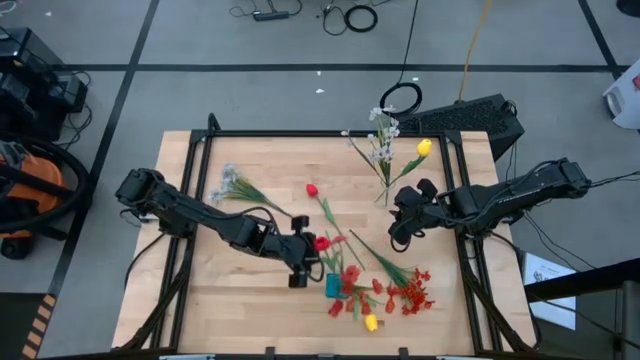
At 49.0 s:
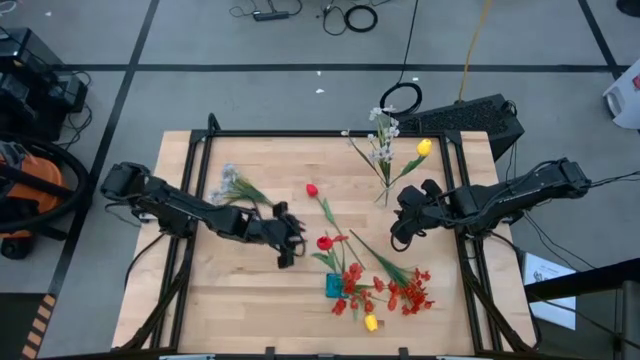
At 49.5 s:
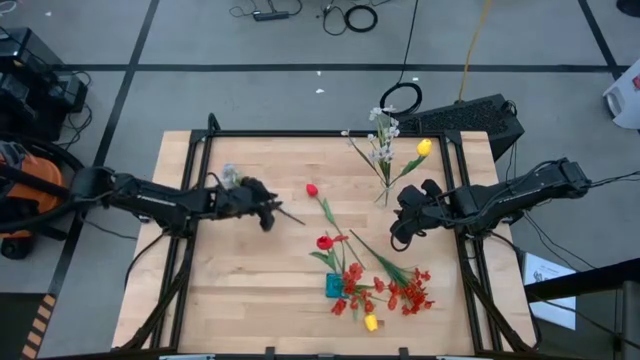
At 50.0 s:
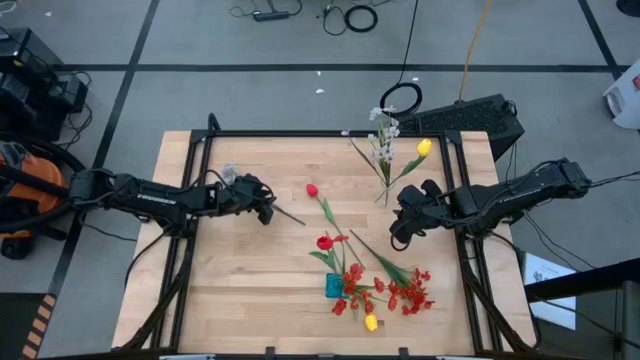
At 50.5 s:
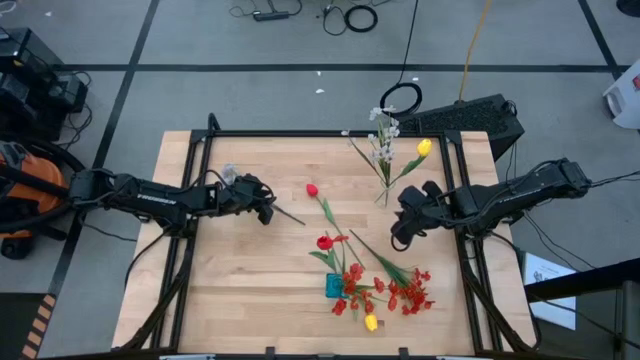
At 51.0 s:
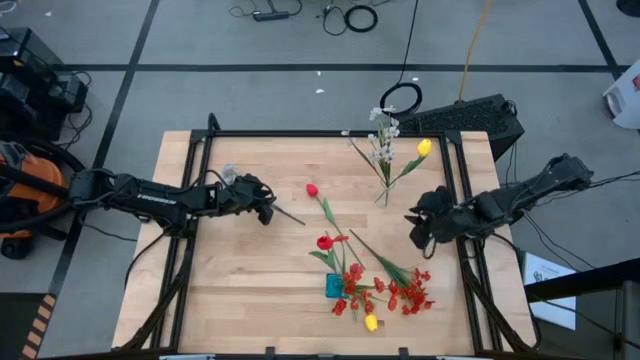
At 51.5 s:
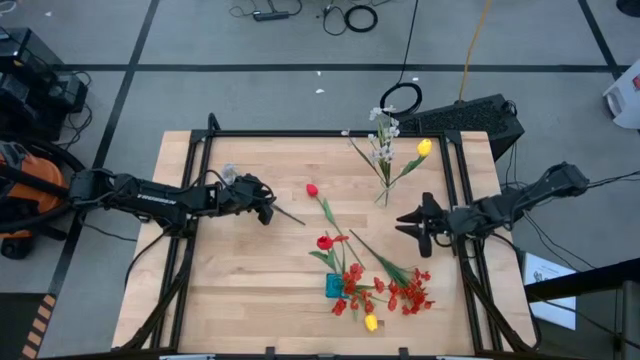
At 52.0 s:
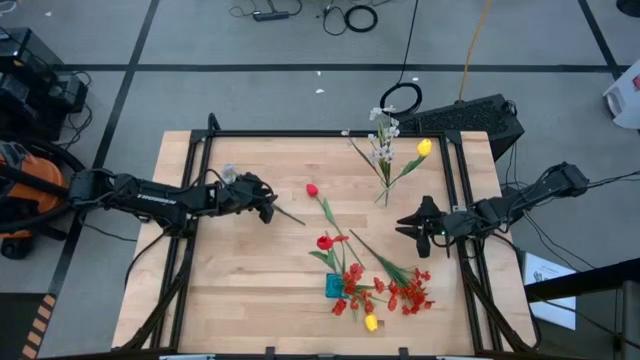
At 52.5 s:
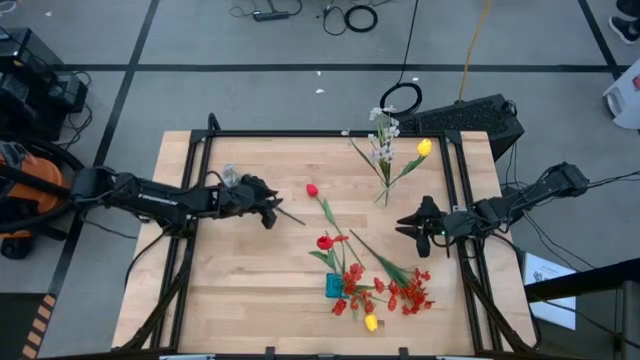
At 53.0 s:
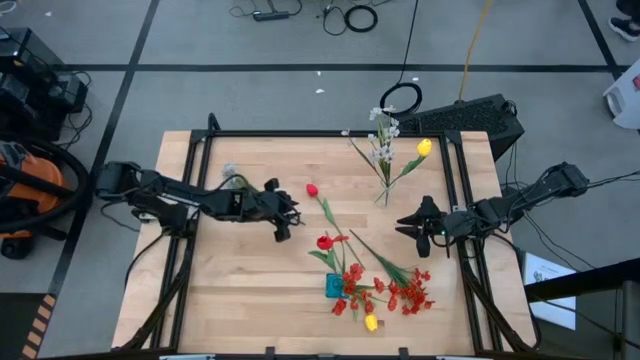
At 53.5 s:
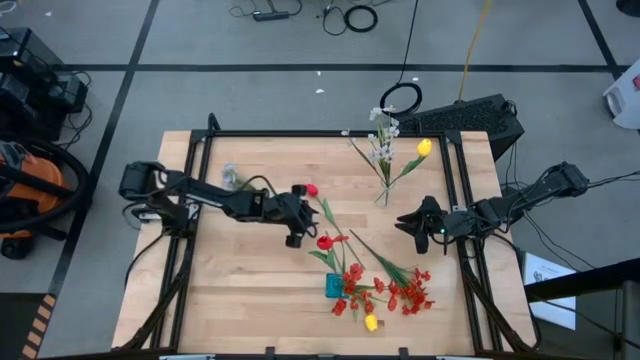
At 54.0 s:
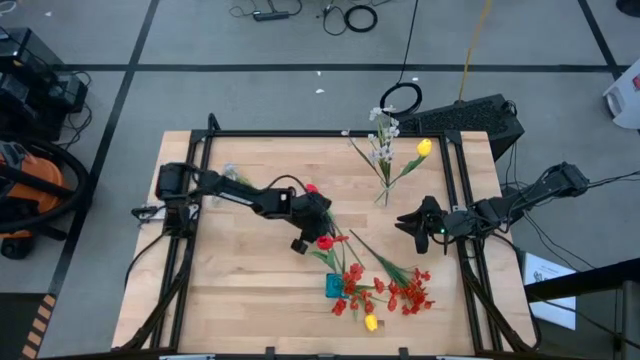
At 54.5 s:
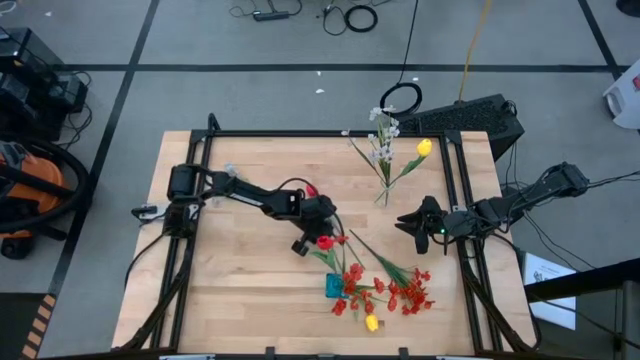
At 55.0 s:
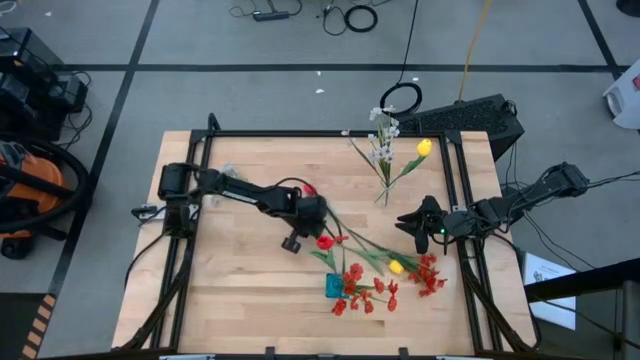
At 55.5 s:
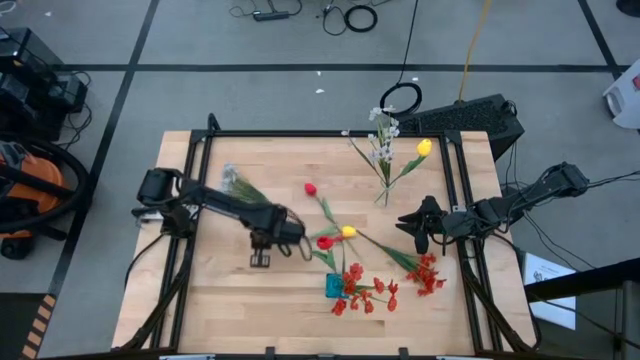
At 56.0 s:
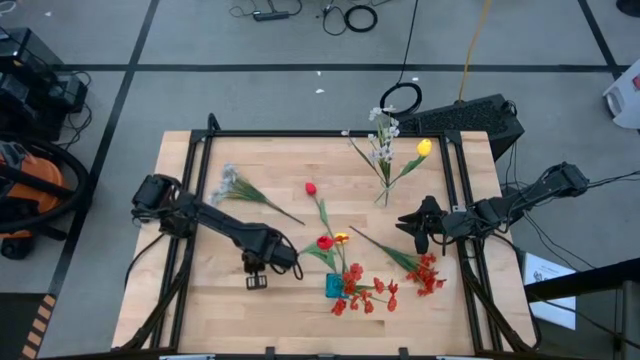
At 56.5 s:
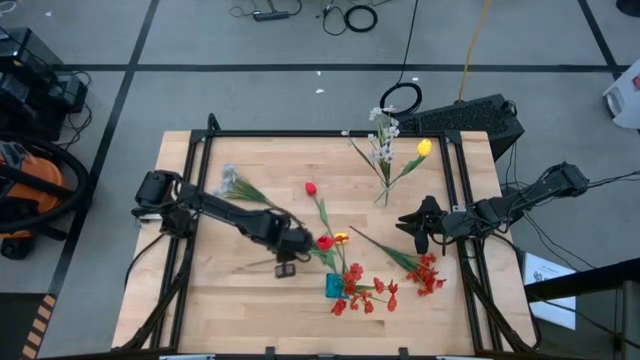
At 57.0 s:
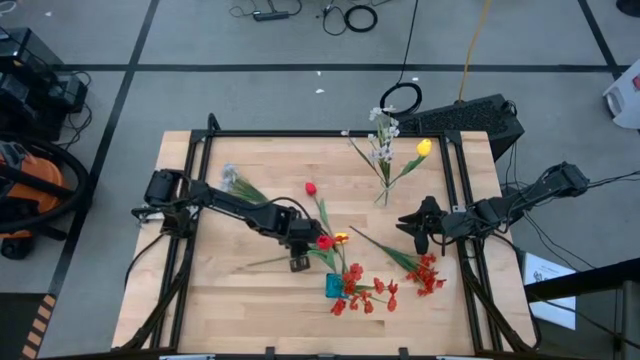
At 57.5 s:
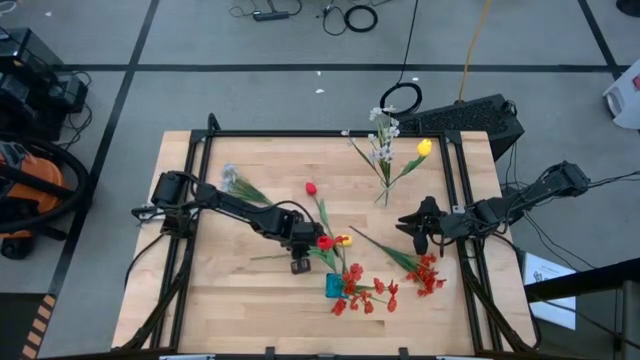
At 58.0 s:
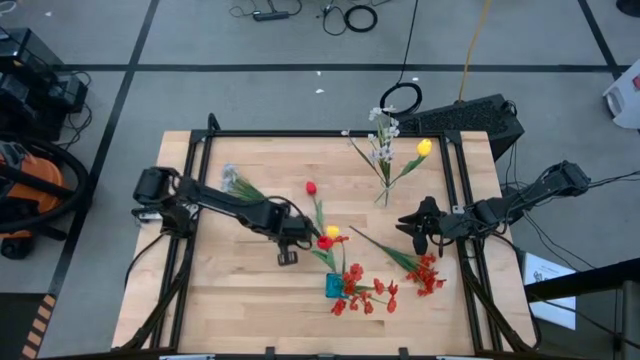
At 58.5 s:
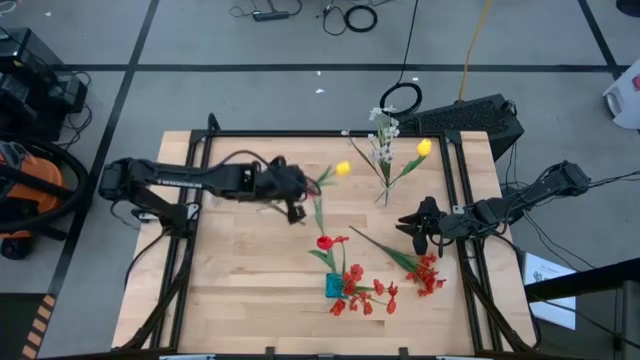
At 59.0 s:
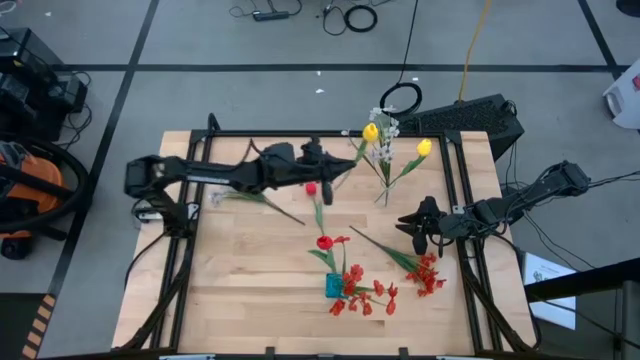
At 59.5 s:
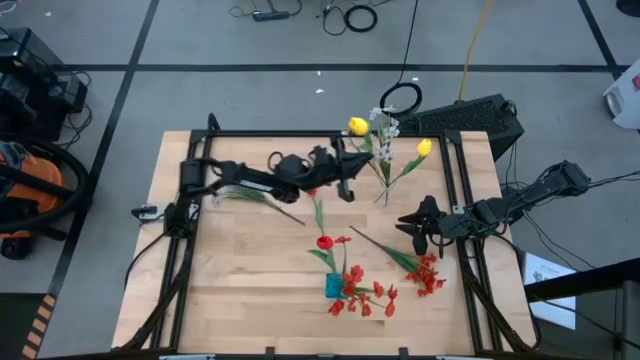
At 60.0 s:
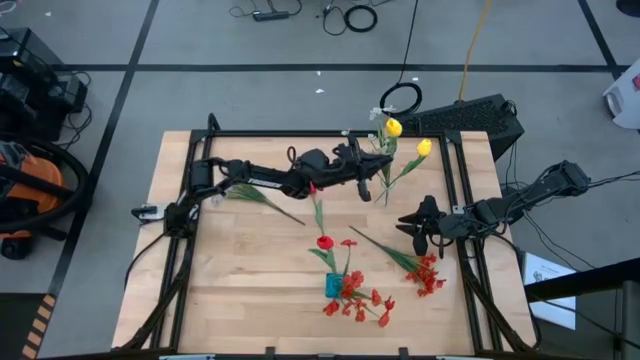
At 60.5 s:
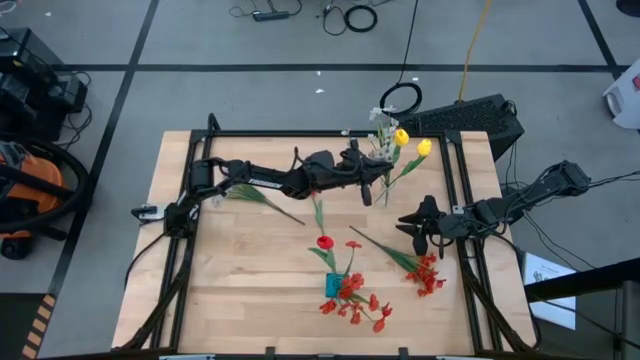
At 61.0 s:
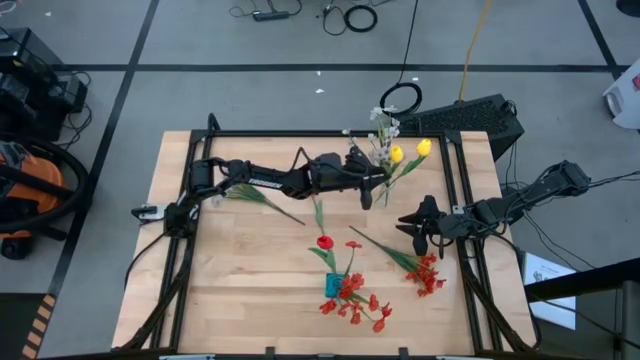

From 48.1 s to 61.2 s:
Task: Sort flowers into vase by color
Put the yellow flower into the transparent vase

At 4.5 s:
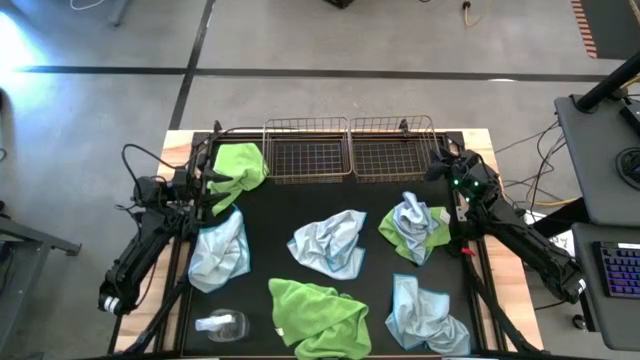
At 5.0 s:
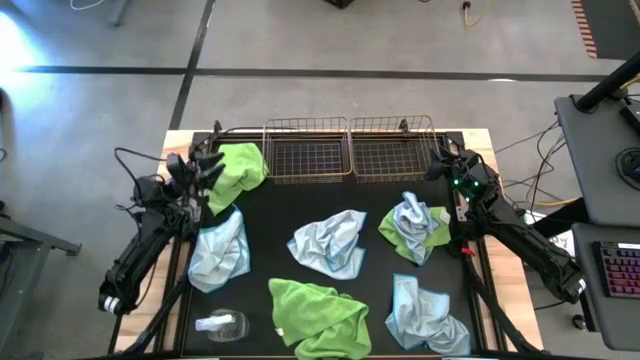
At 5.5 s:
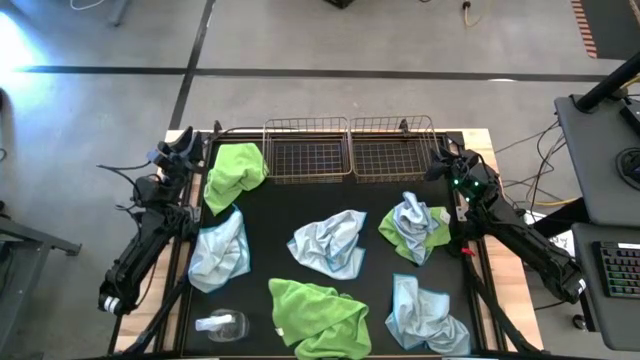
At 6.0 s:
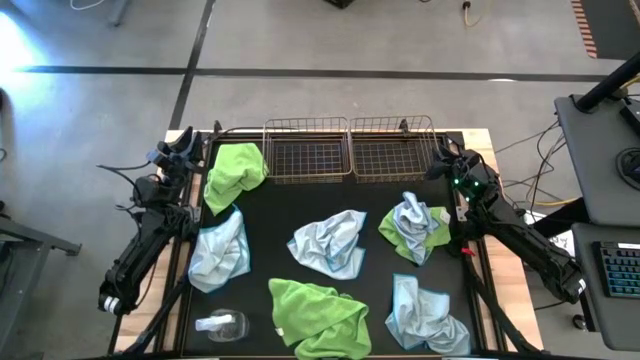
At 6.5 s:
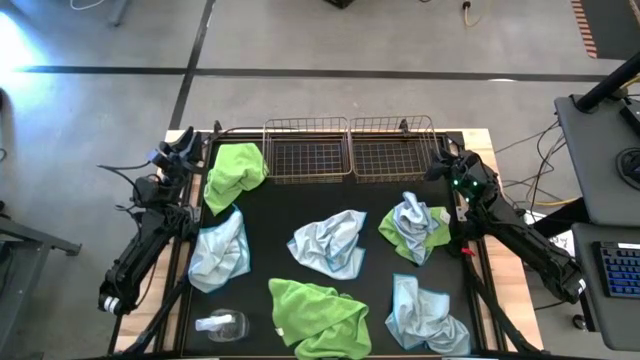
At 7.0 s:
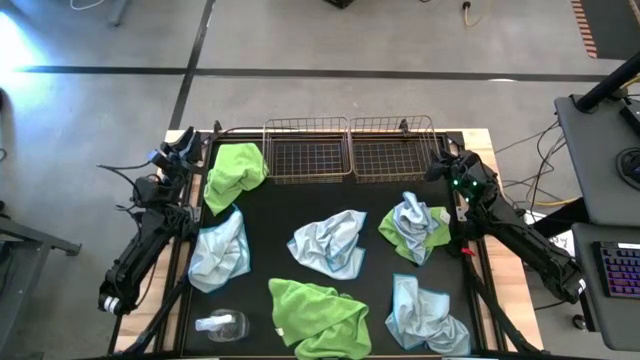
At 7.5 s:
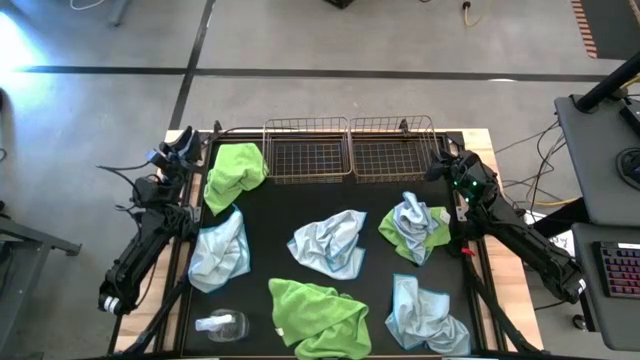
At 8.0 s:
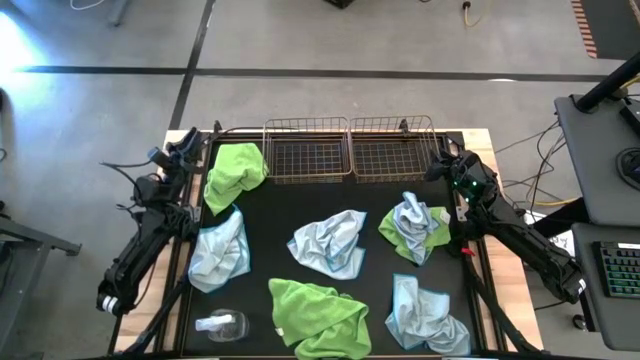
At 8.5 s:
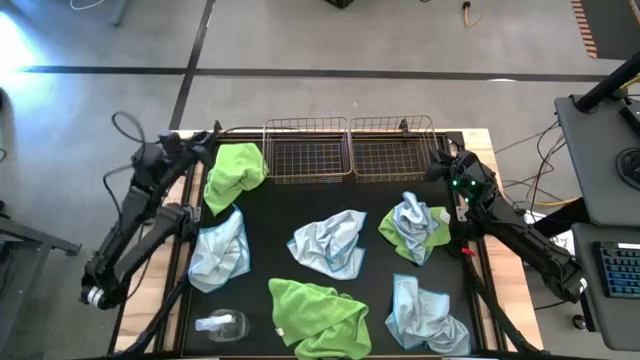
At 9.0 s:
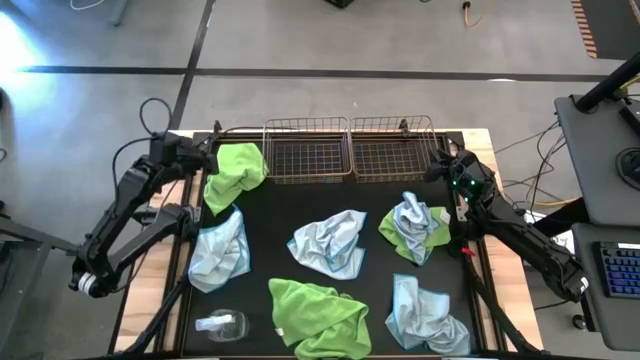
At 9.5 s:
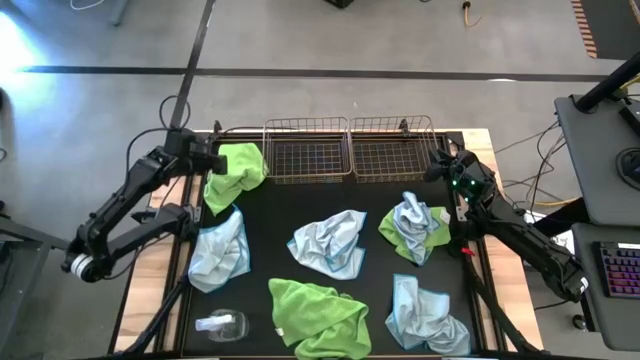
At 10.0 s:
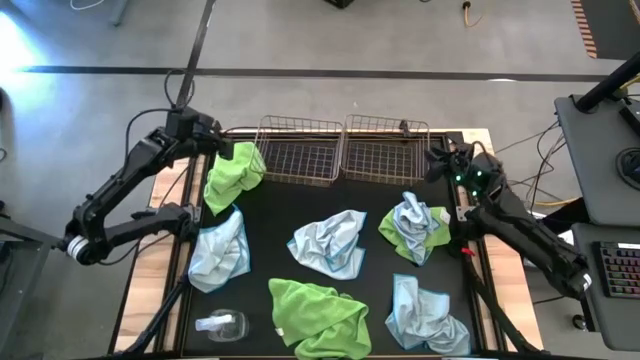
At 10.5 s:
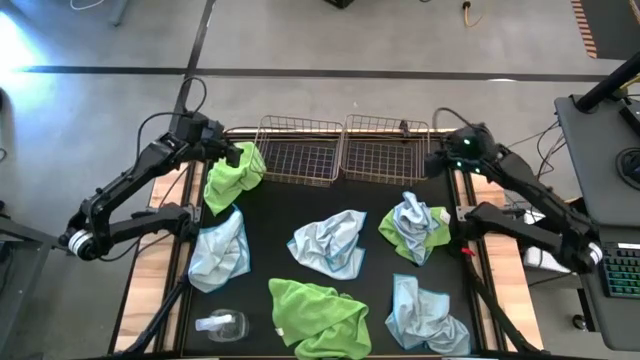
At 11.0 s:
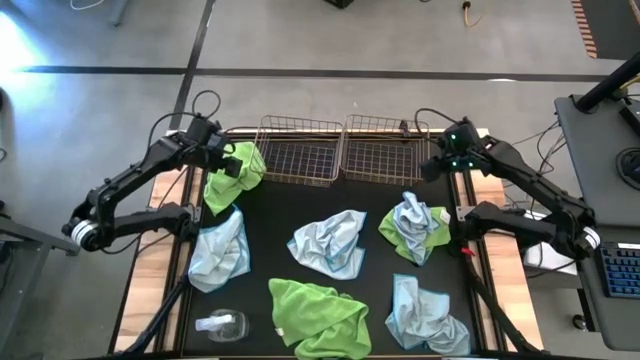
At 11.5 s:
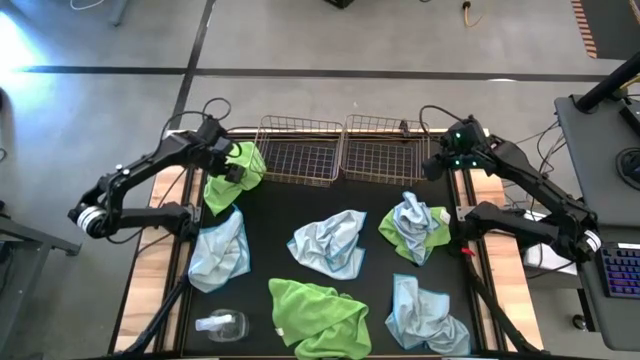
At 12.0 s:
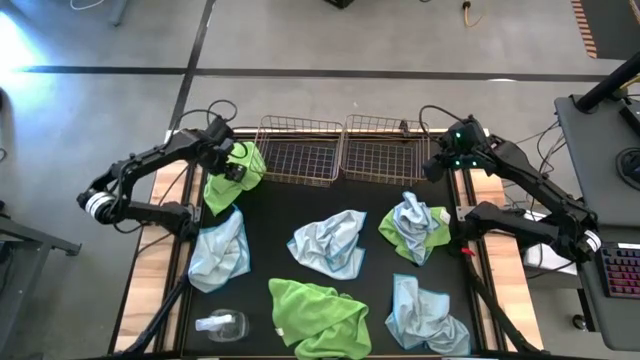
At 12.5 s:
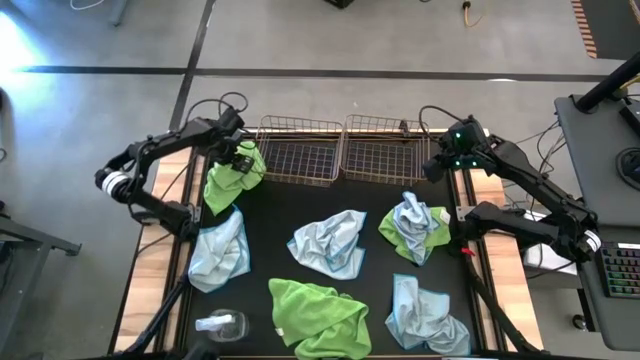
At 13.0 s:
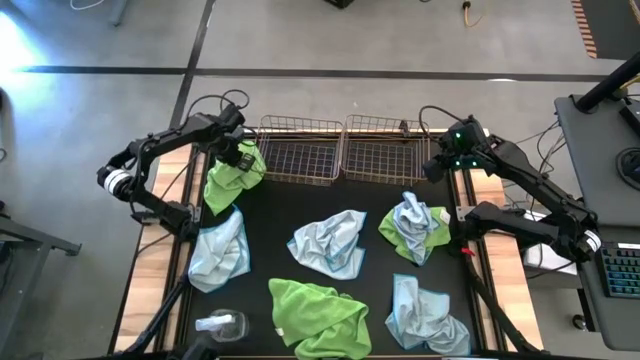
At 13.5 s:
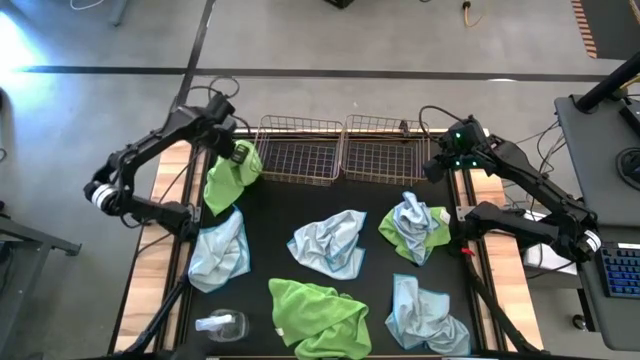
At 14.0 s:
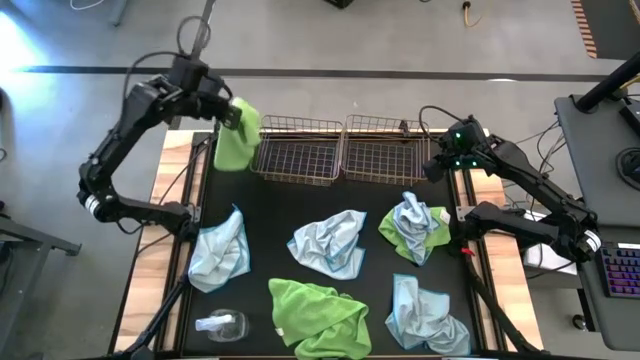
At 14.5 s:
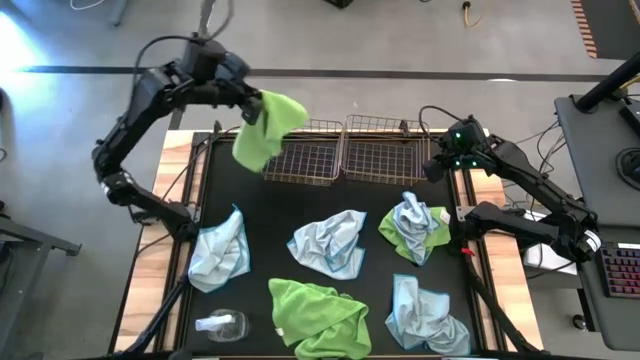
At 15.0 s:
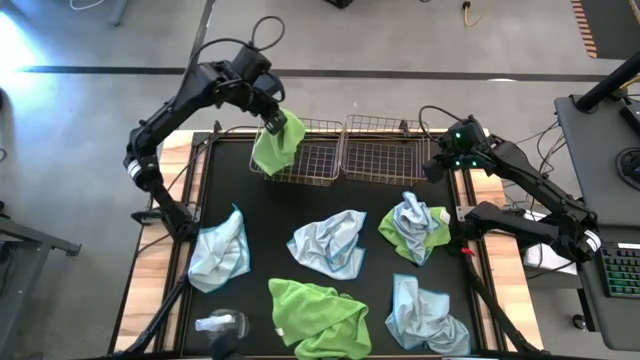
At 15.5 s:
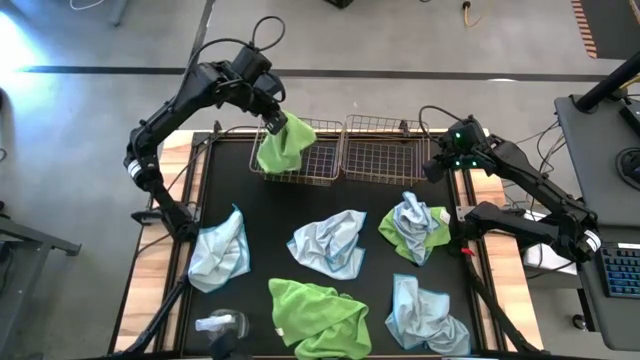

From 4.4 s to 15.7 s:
Task: Sort microfiber towel by color & place in baskets
Put the green microfiber cloth into the left wire basket
